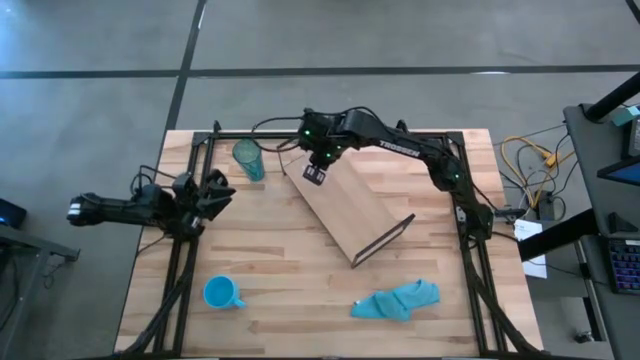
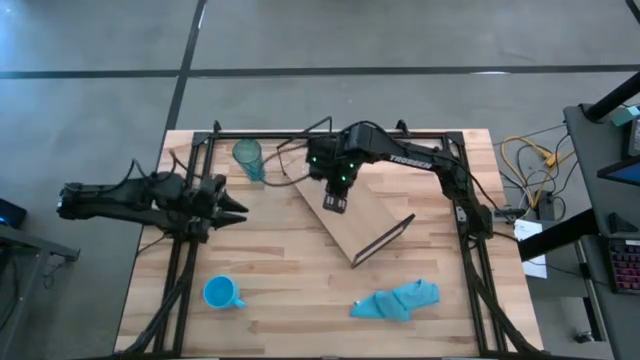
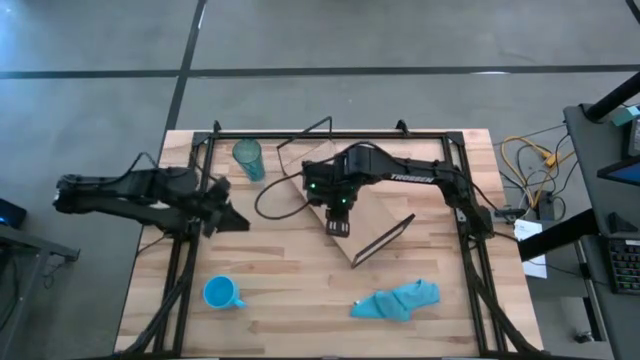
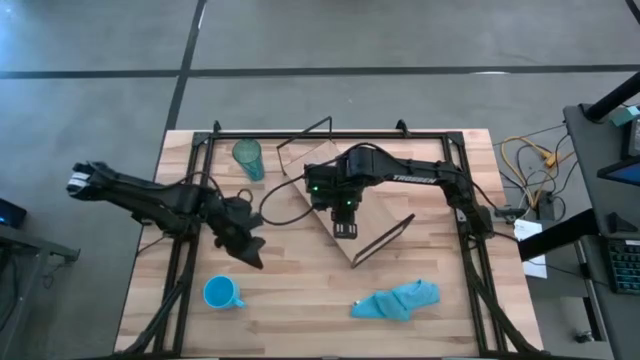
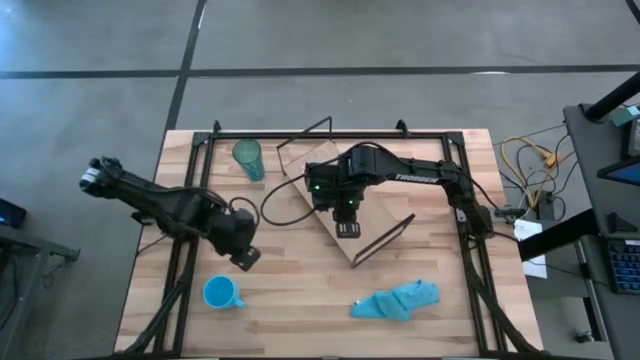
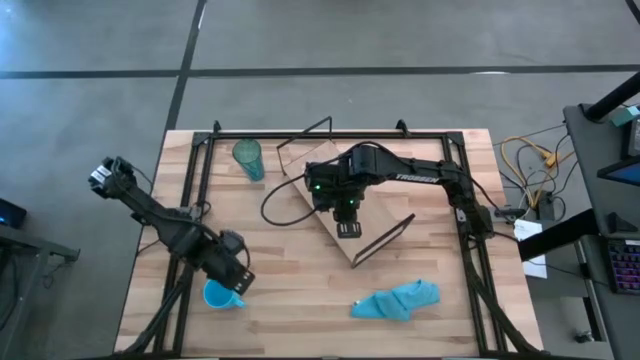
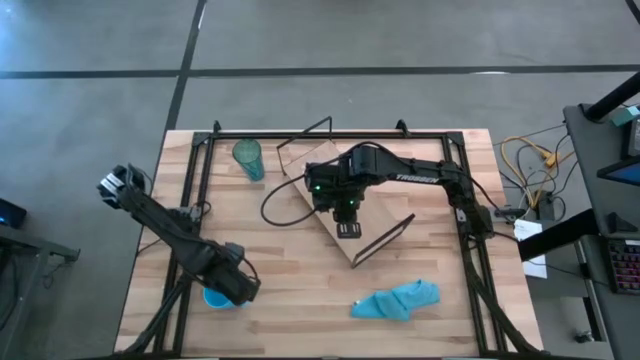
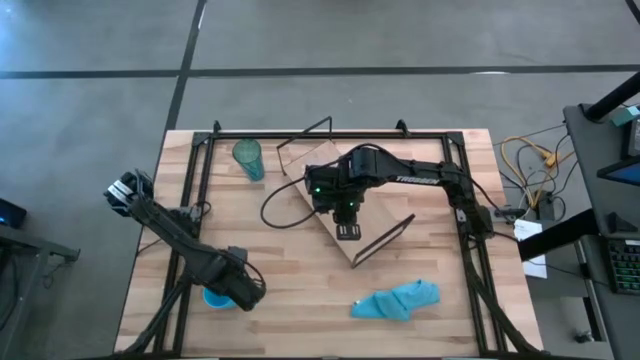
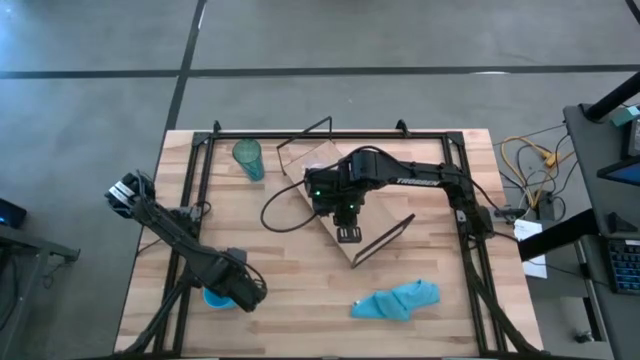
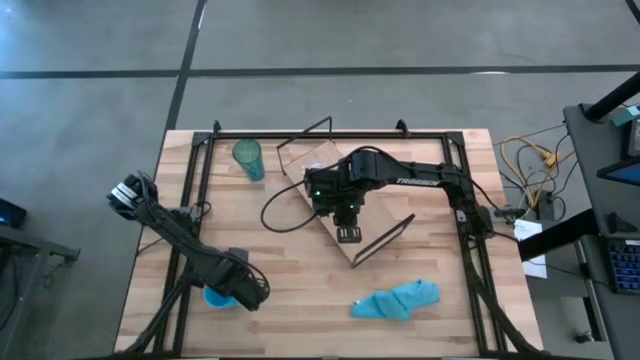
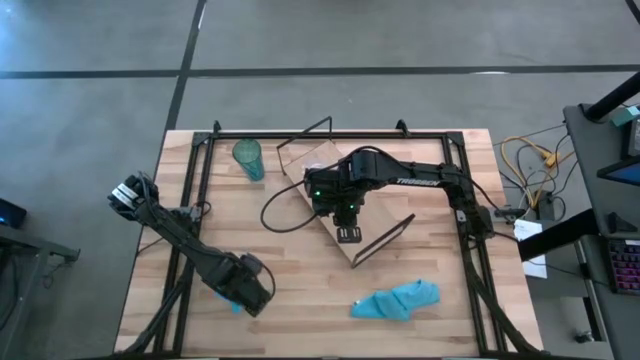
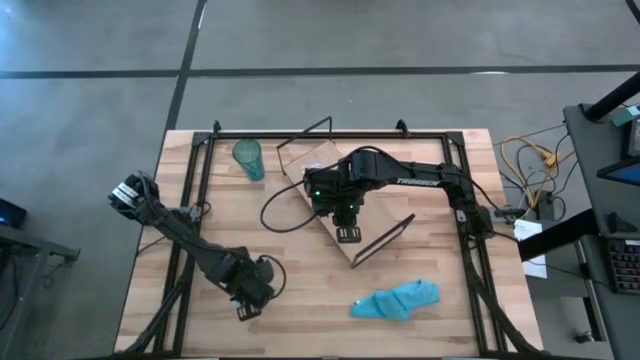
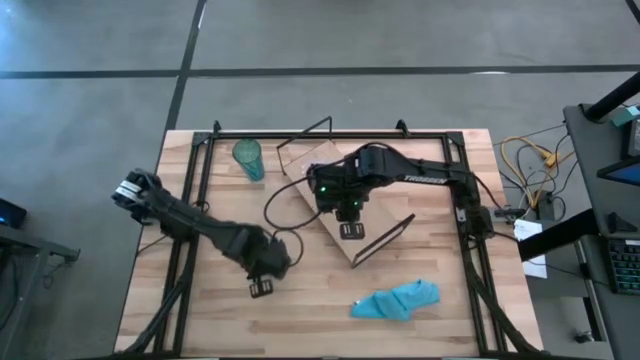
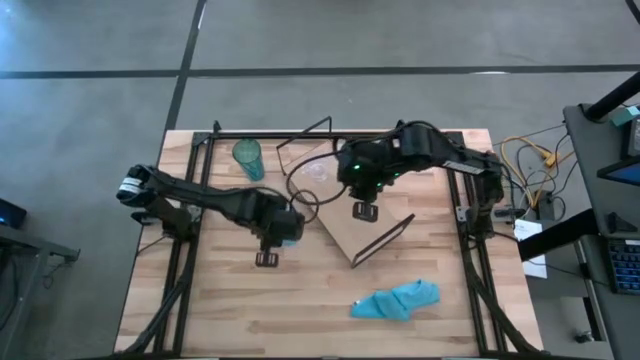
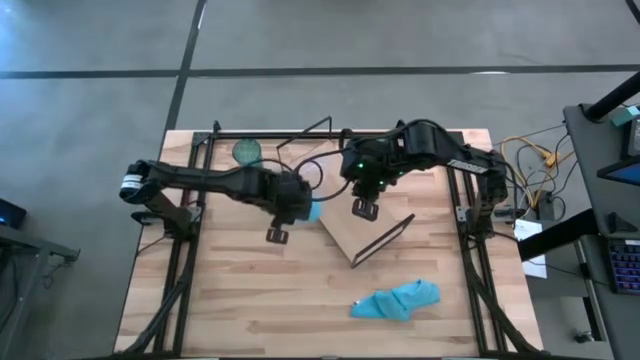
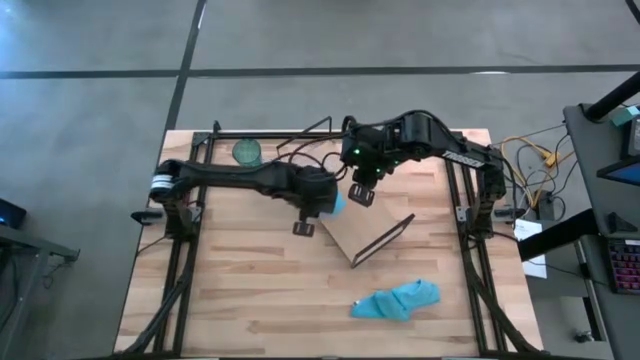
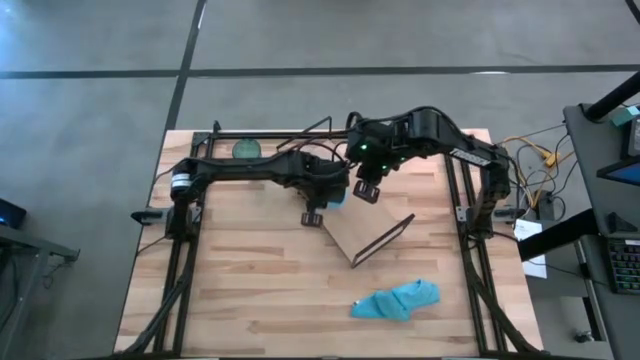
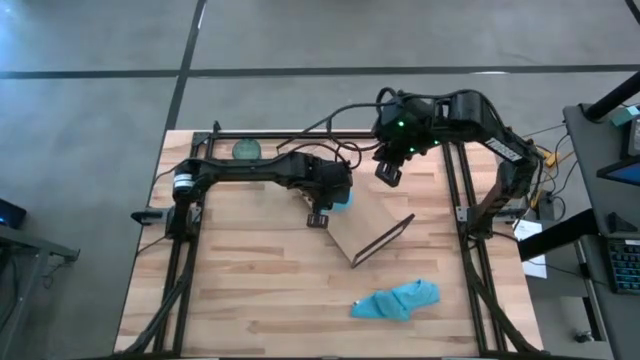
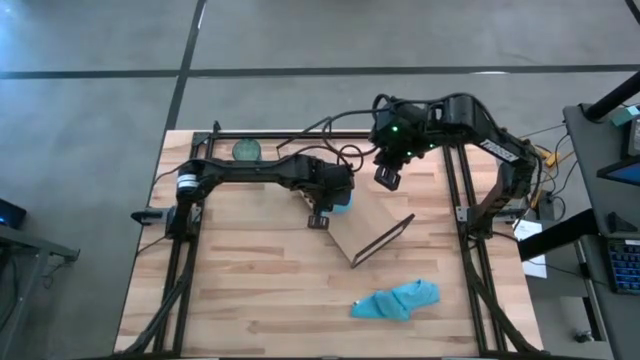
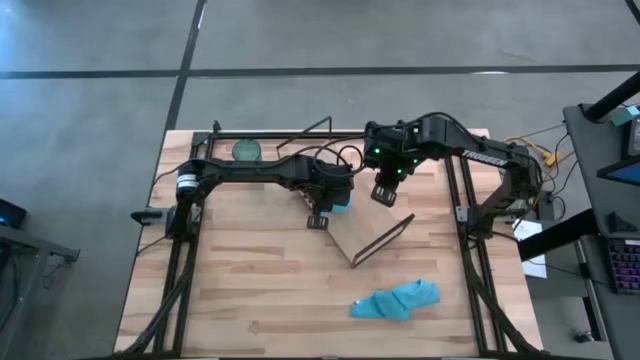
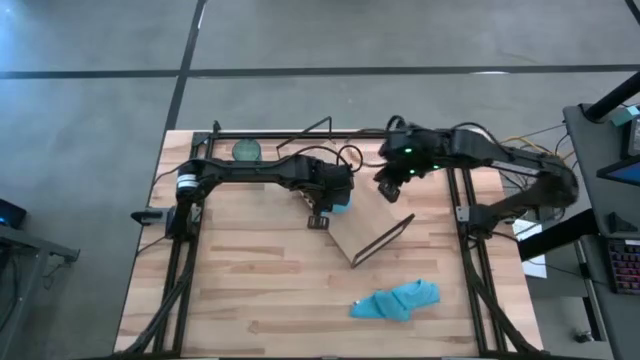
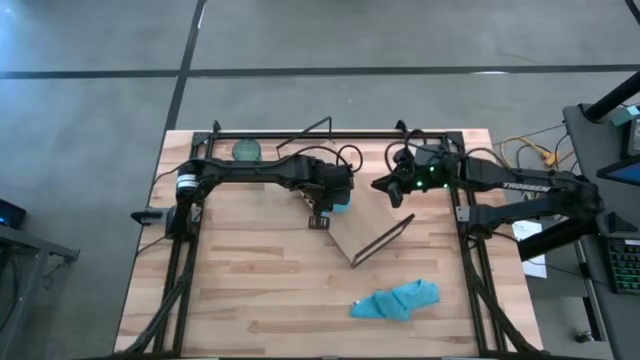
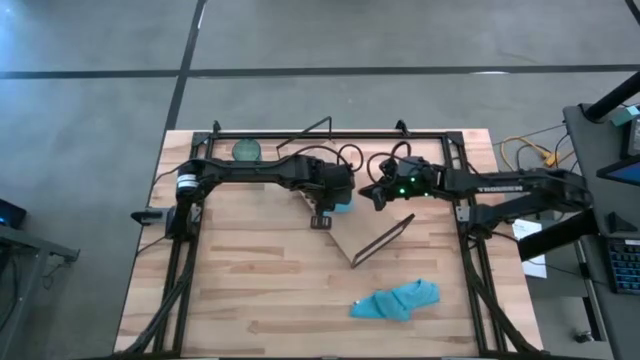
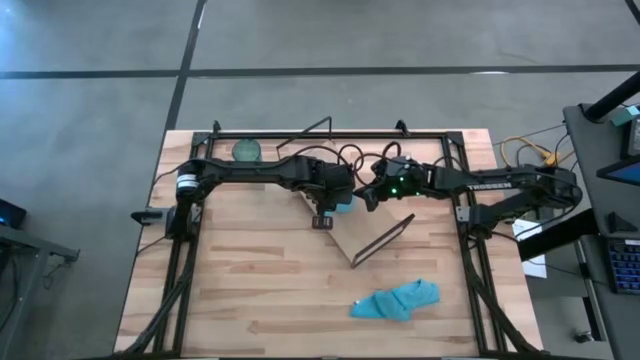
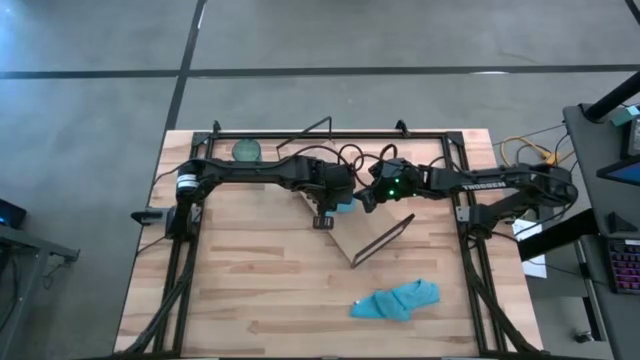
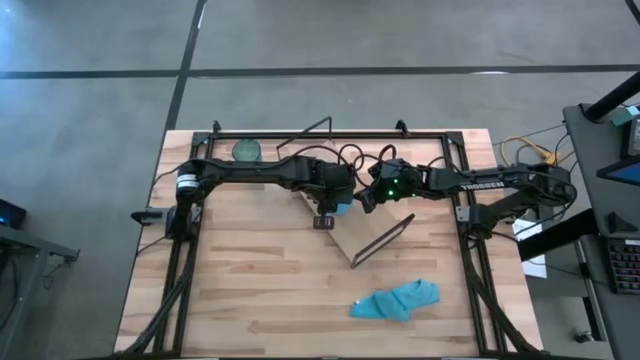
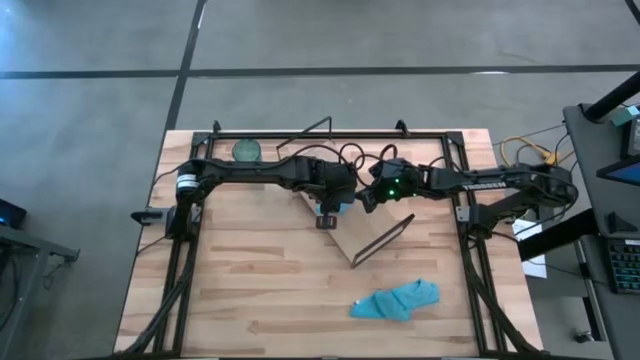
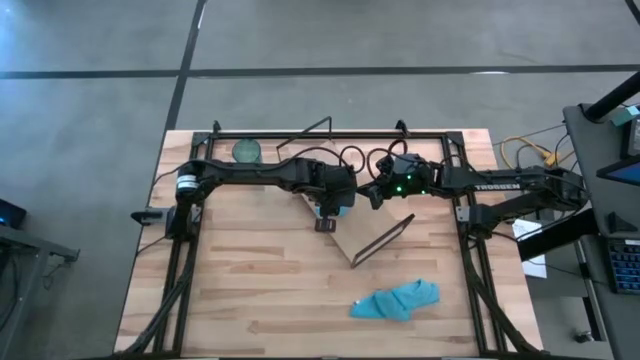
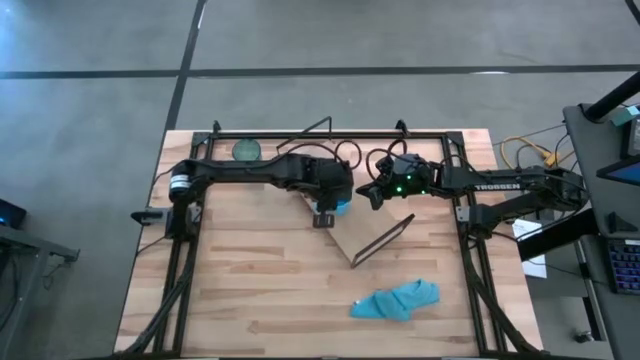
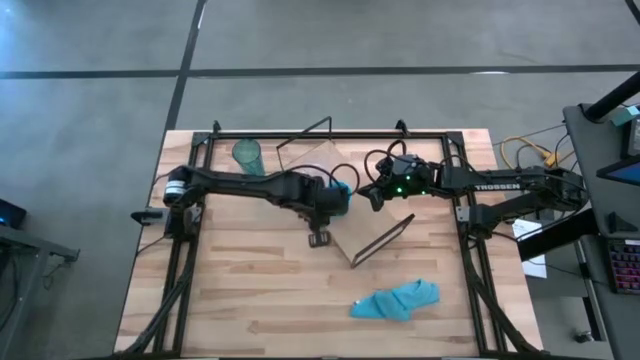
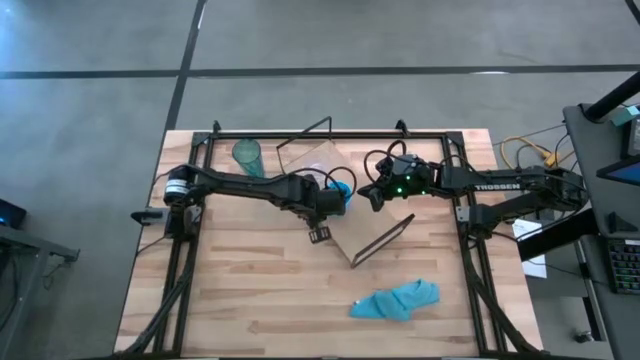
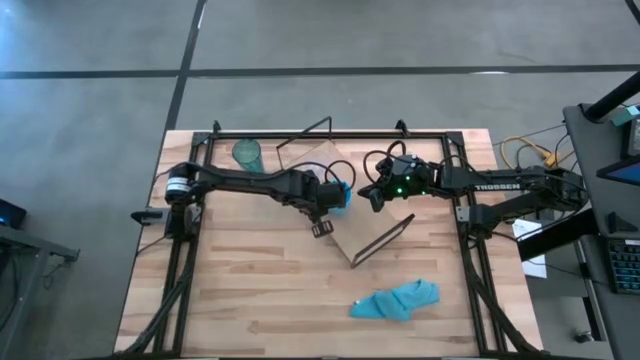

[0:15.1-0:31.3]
Task: Stack small to large cups/mugs on shelf
Put the blue mug on the shelf

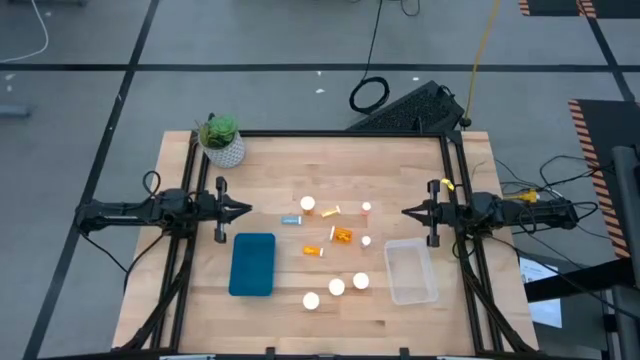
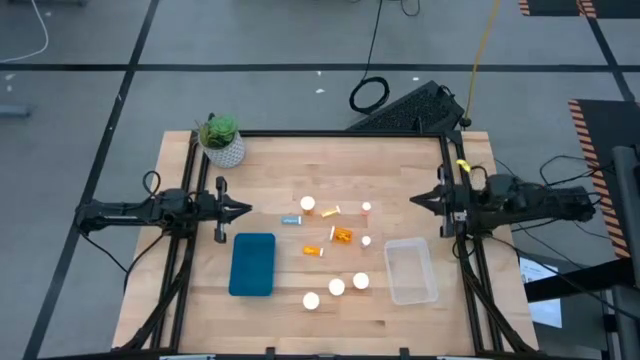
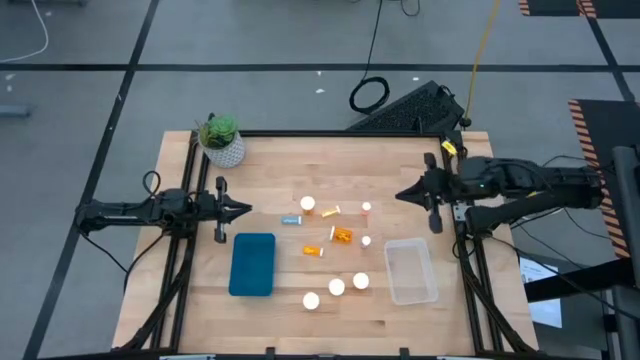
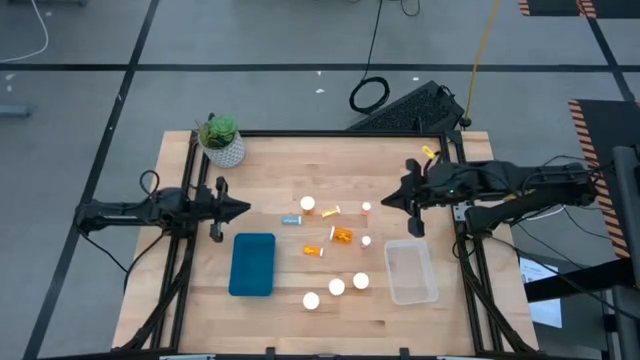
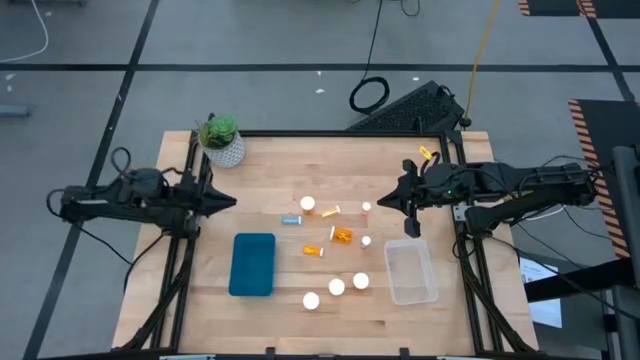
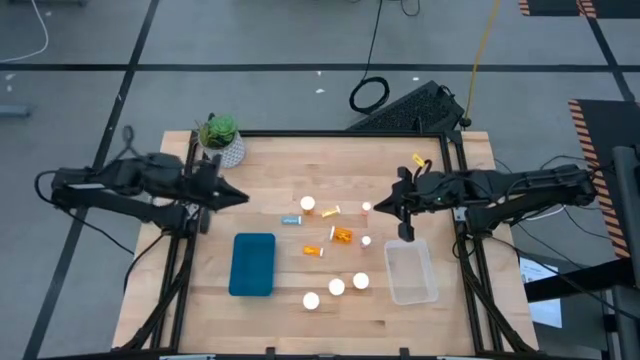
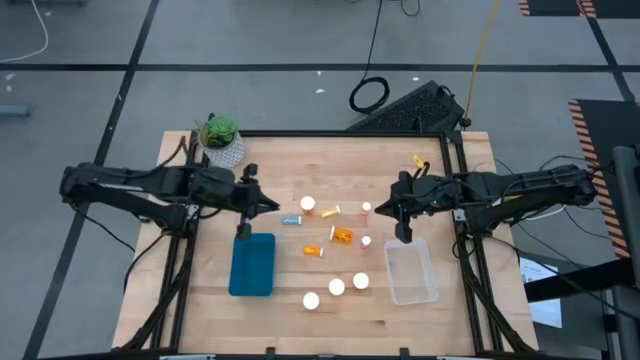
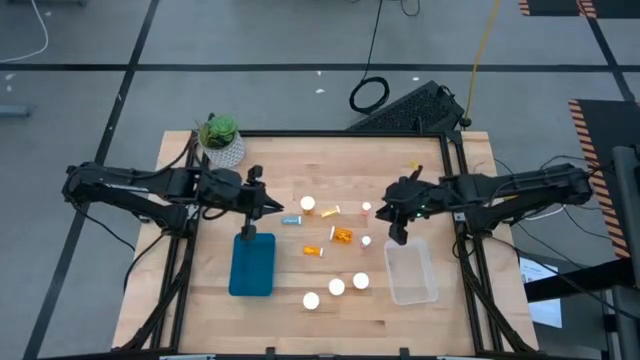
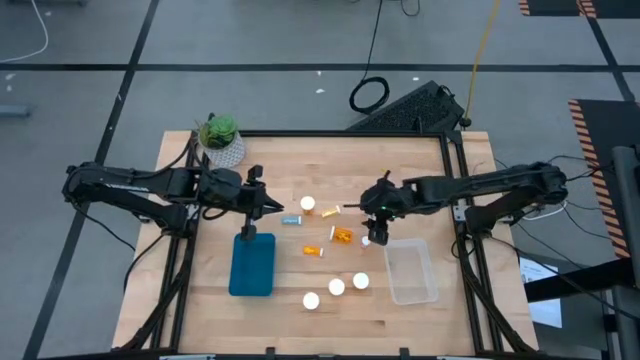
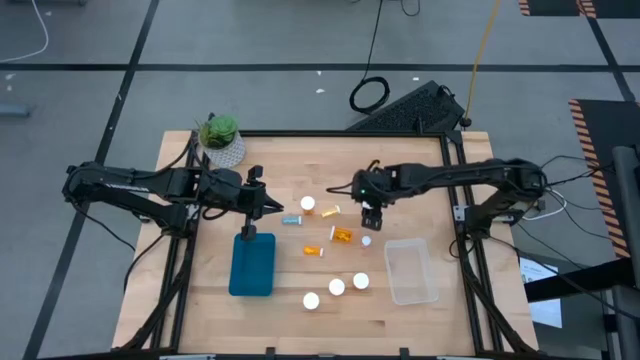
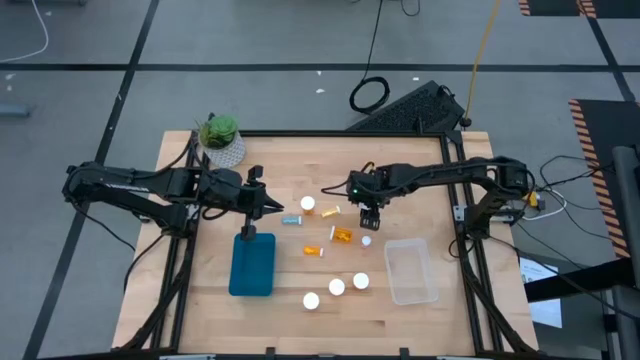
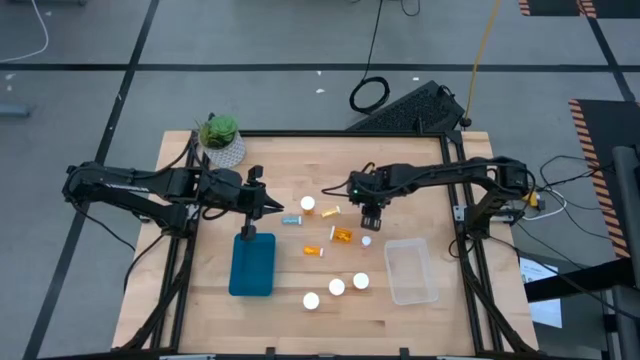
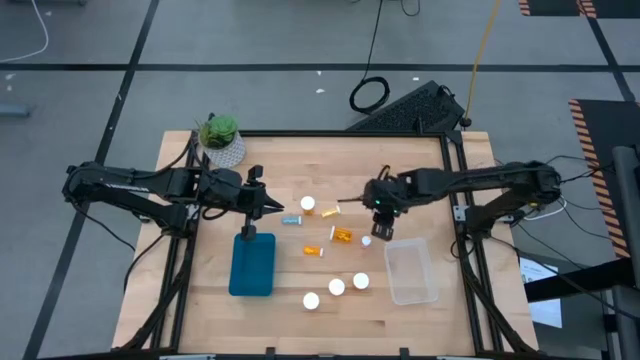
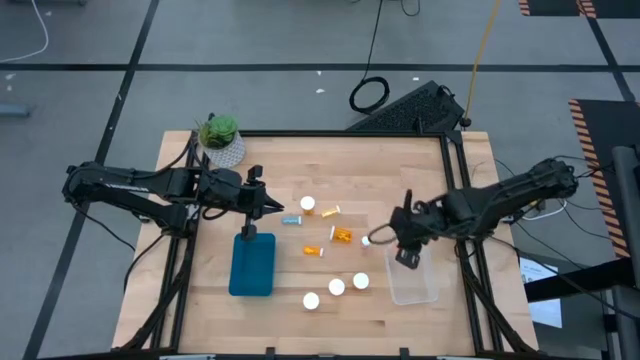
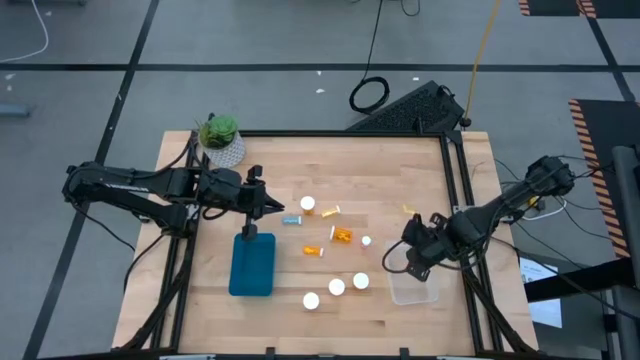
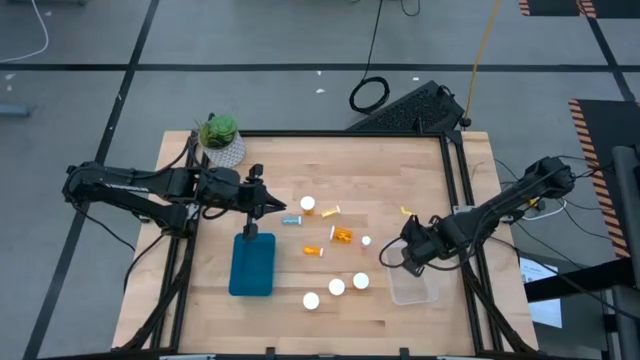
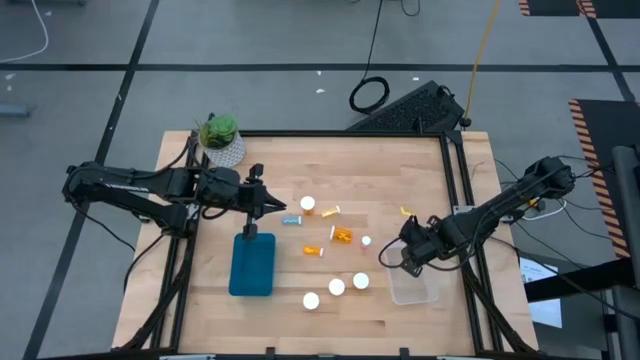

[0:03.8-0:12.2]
Task: Pick and place medicine bottles into bin by pill shape (circle, oval)
Put the pink bottled tablet into the transparent bin
